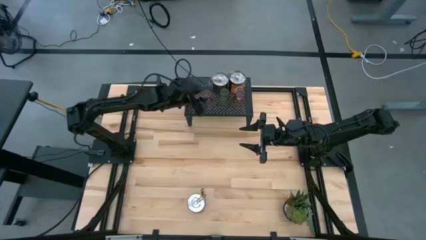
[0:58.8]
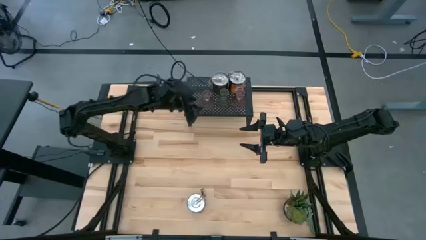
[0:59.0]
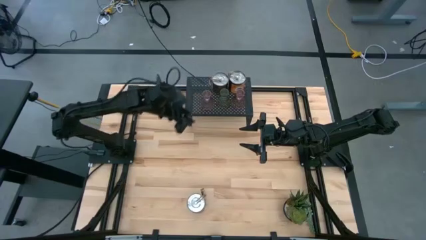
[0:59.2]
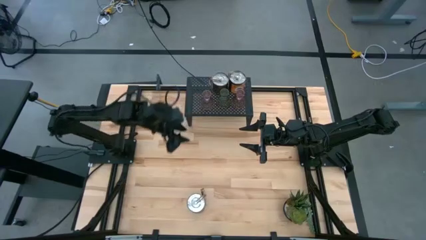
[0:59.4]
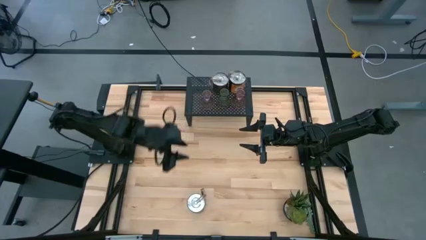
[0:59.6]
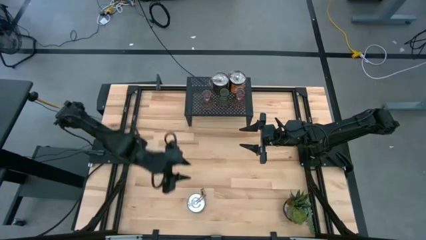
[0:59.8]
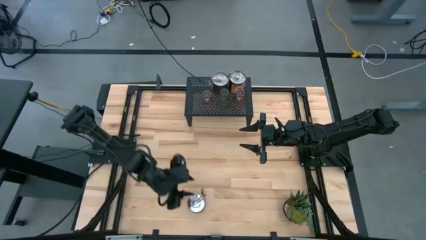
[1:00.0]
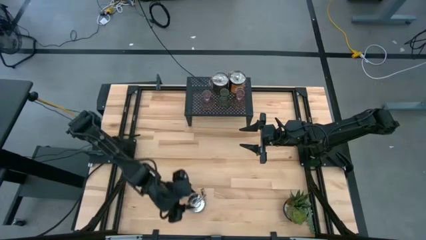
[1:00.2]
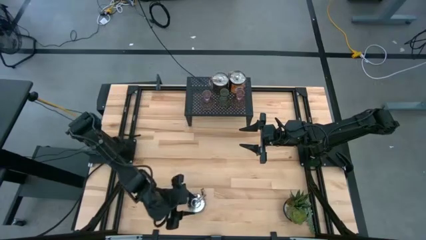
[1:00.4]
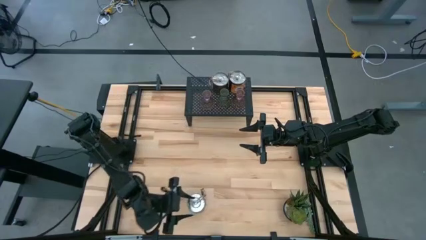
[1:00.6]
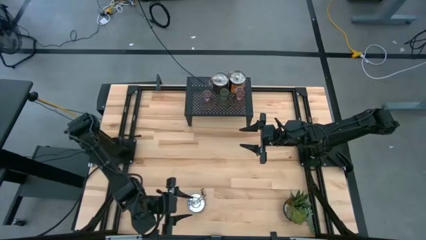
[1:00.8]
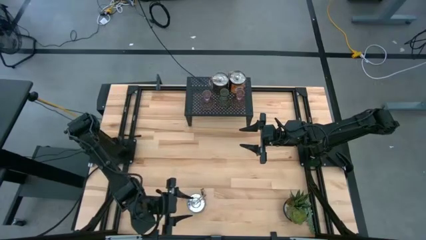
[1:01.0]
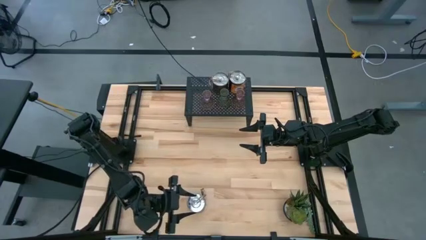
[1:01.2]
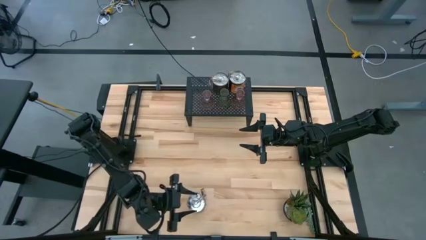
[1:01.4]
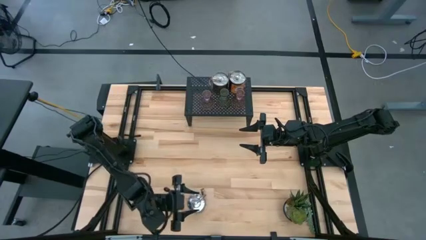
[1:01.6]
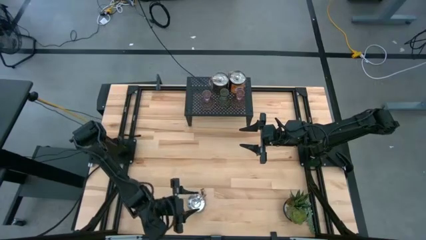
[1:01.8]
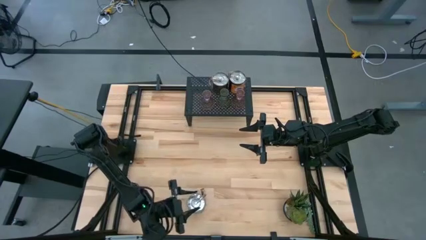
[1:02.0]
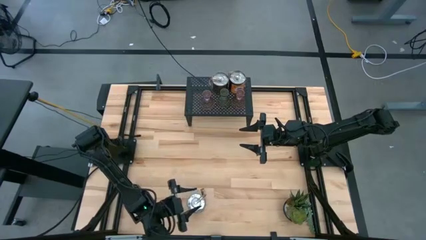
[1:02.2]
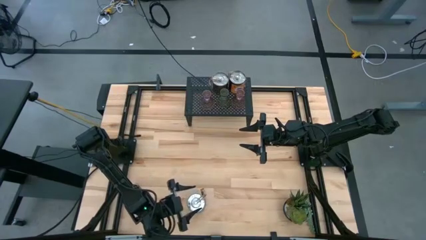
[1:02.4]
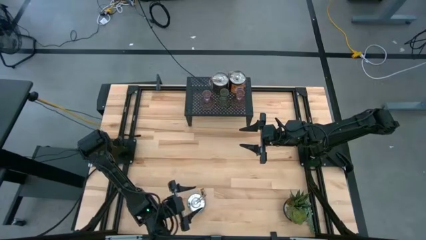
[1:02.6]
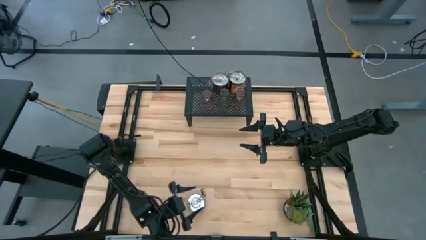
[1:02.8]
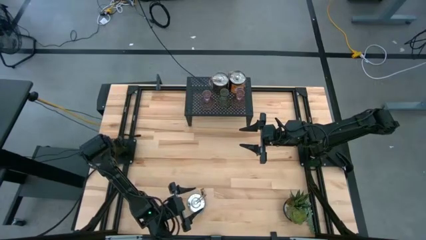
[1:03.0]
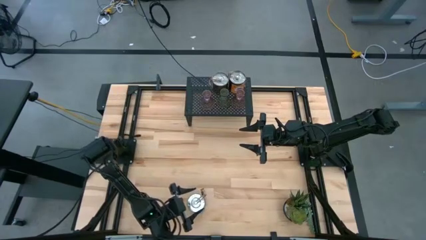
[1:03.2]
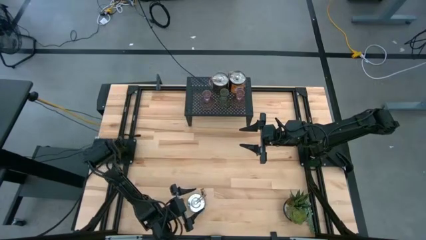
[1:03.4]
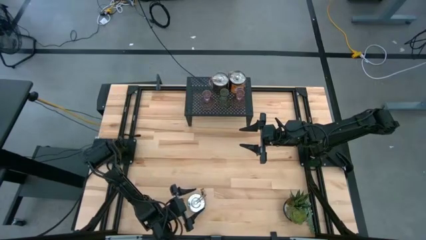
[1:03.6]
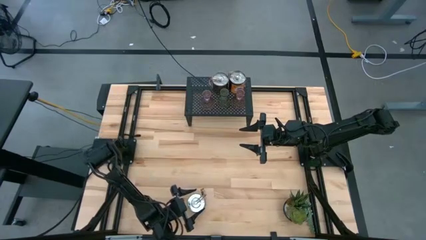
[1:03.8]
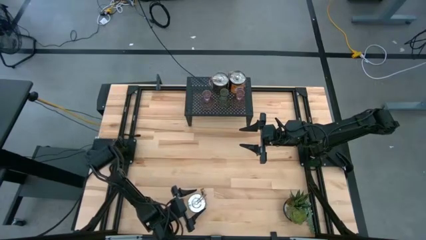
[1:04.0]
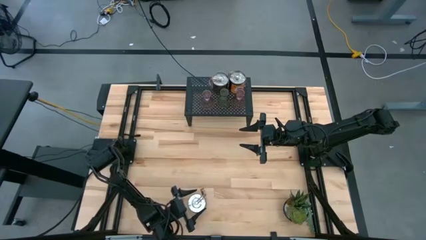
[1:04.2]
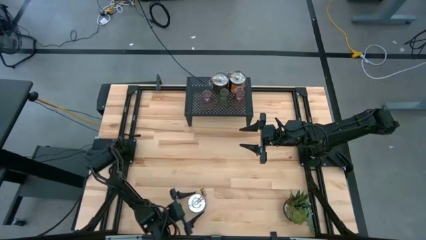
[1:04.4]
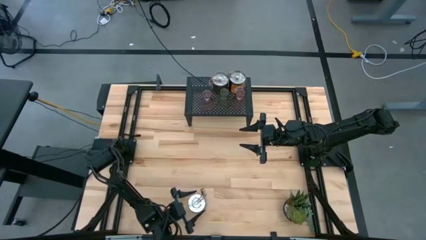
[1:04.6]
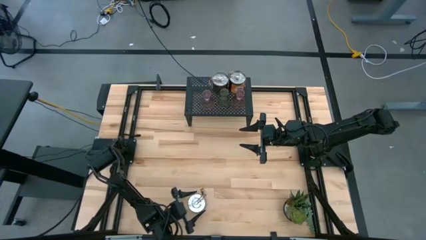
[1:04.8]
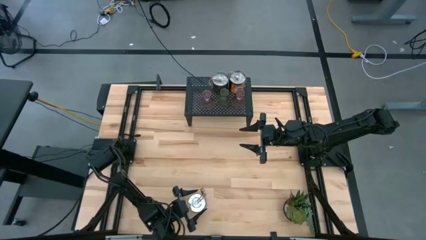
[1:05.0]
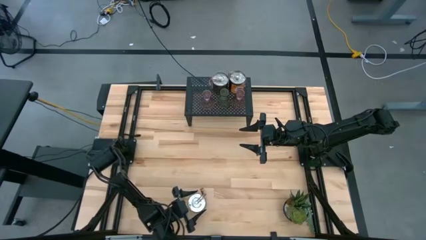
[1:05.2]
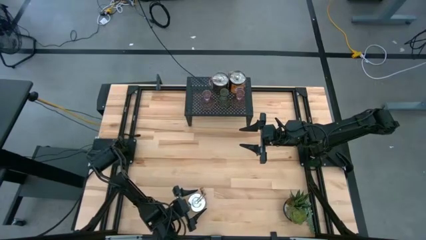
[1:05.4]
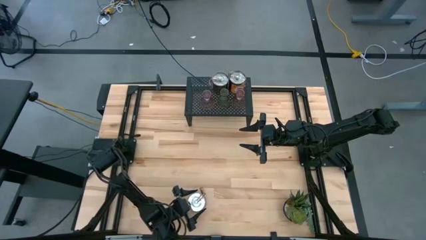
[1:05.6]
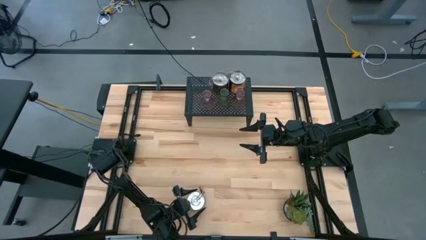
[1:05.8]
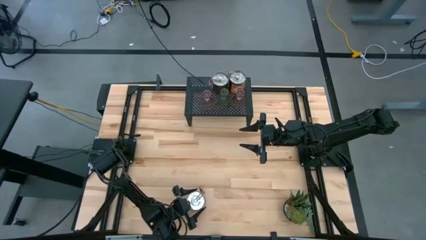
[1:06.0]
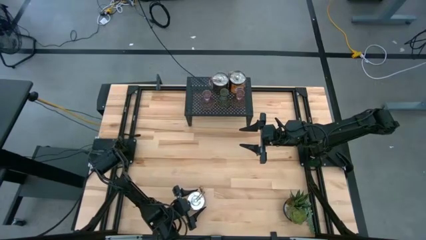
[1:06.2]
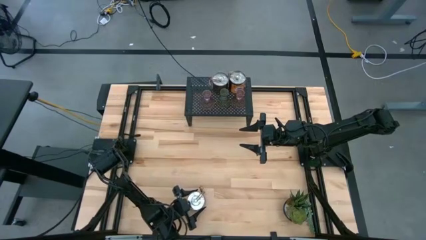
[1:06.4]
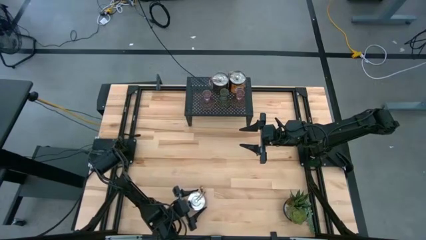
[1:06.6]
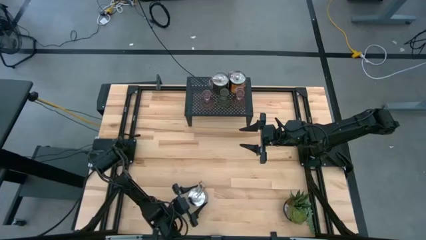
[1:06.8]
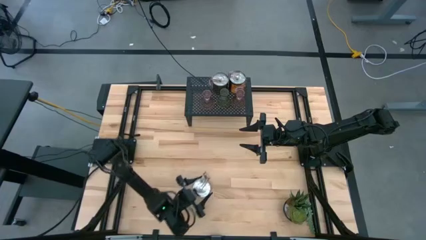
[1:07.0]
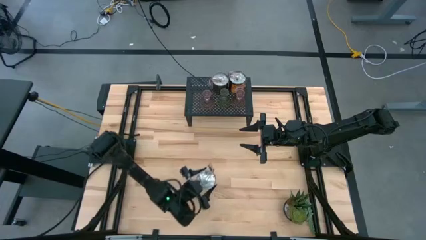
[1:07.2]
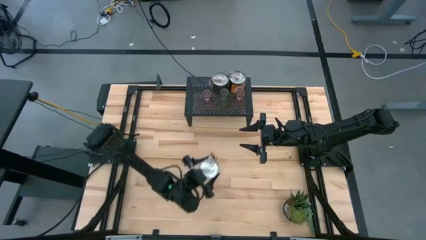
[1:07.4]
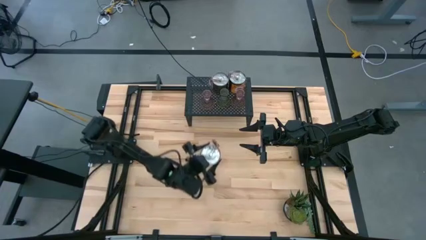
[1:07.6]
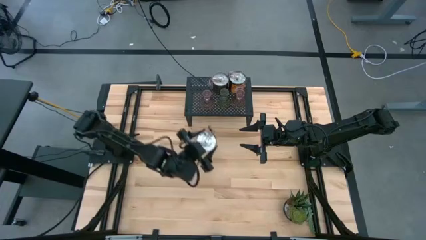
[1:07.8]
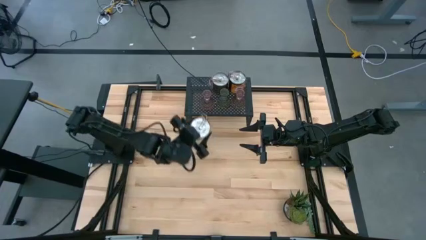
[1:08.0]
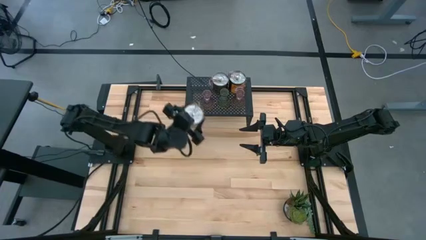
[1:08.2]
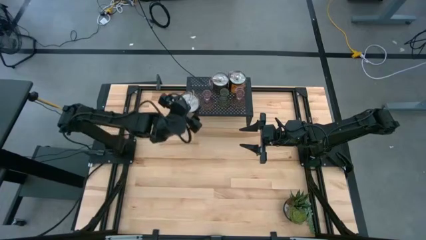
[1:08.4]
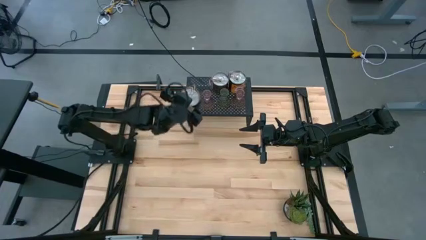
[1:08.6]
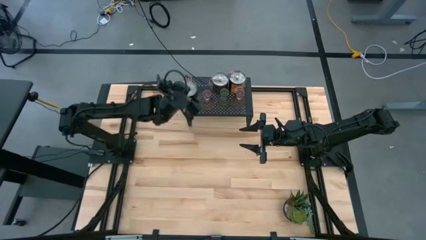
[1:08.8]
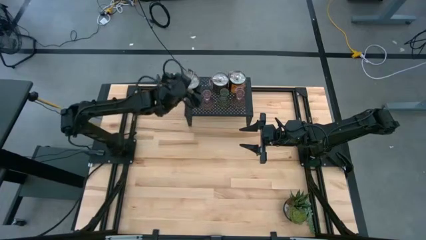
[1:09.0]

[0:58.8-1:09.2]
Task: Pick & Place candle stick holders
Put the silver scented candle on the shelf aligned with the other scented candles
